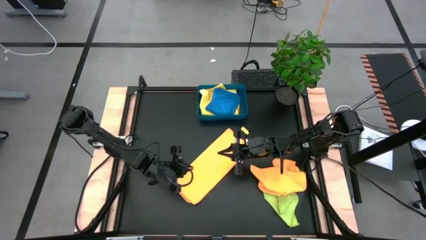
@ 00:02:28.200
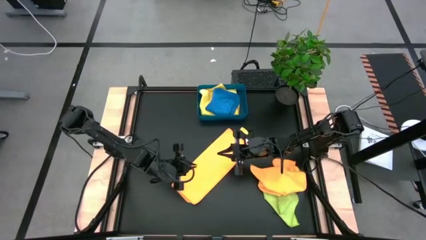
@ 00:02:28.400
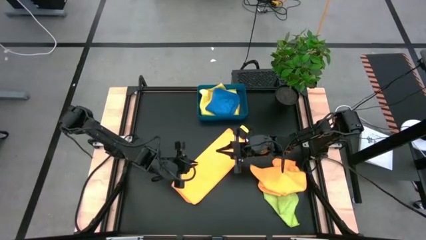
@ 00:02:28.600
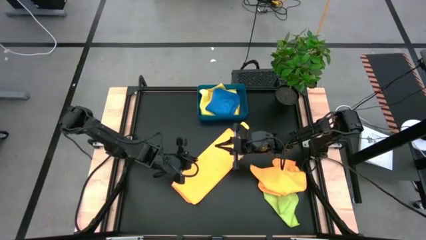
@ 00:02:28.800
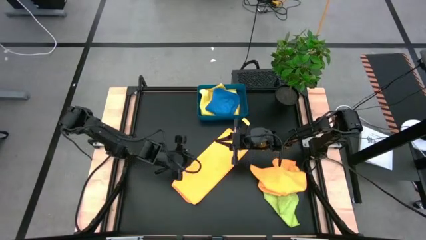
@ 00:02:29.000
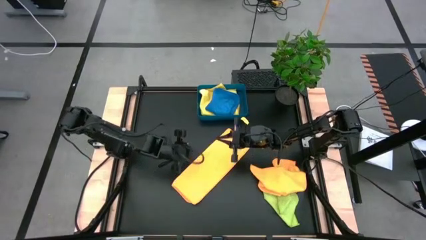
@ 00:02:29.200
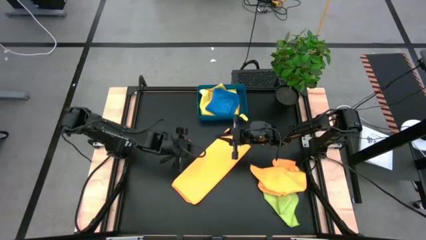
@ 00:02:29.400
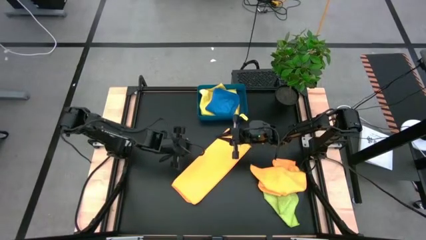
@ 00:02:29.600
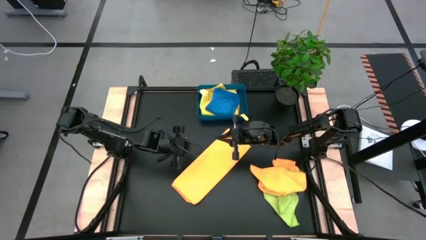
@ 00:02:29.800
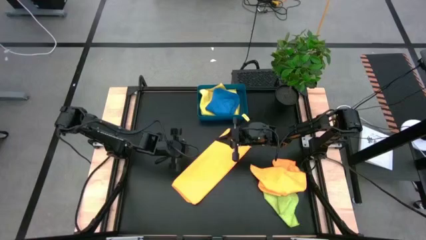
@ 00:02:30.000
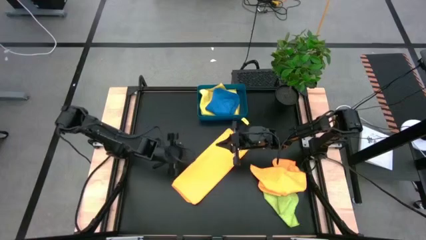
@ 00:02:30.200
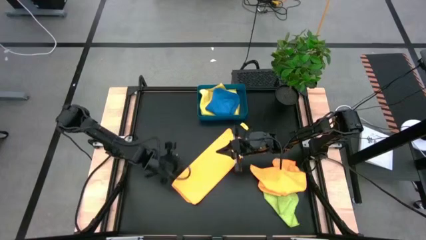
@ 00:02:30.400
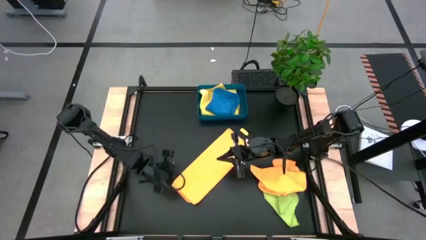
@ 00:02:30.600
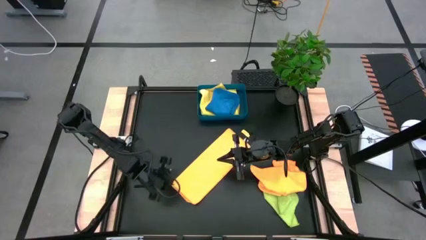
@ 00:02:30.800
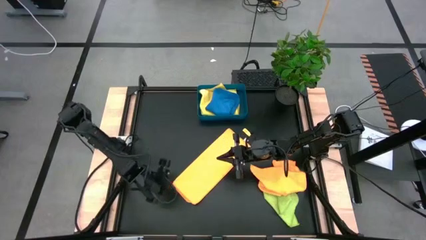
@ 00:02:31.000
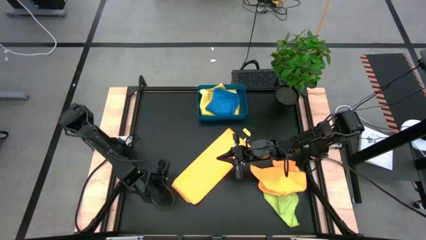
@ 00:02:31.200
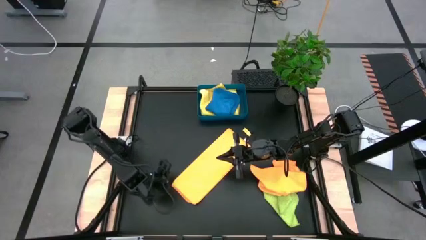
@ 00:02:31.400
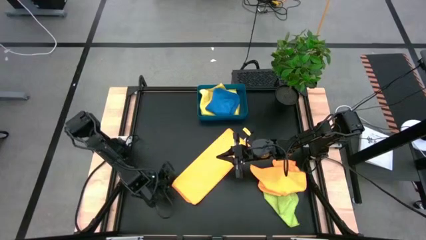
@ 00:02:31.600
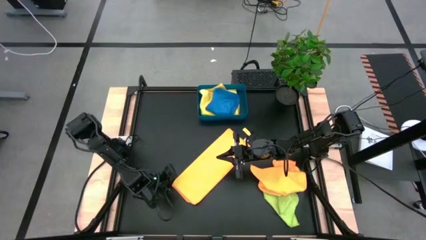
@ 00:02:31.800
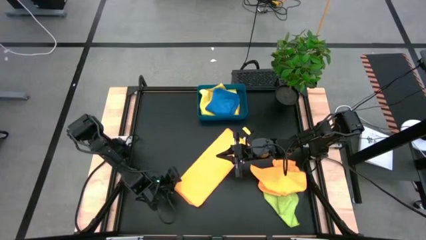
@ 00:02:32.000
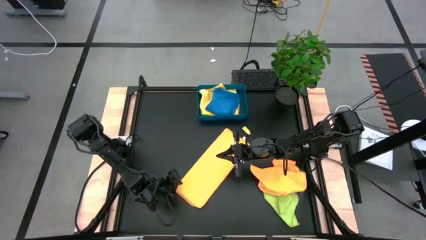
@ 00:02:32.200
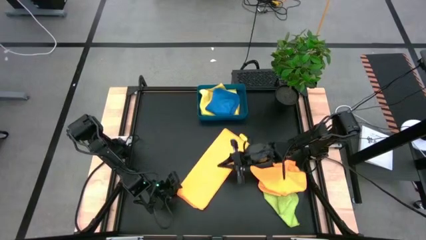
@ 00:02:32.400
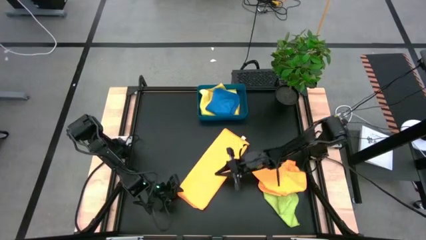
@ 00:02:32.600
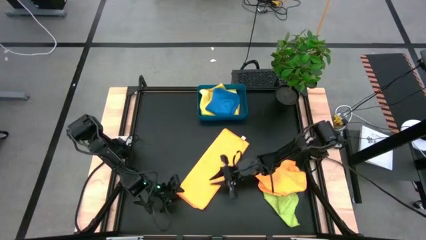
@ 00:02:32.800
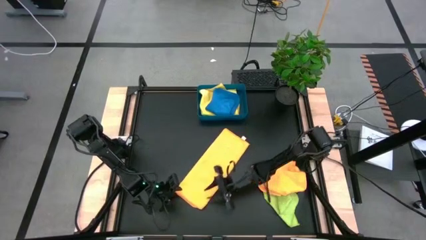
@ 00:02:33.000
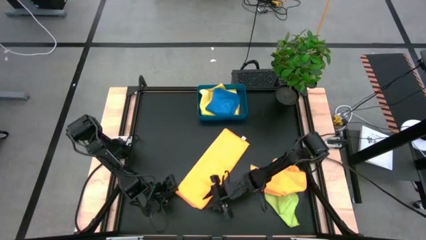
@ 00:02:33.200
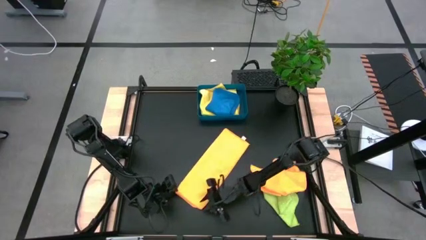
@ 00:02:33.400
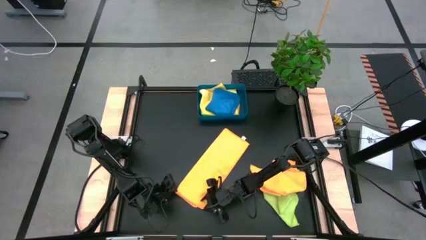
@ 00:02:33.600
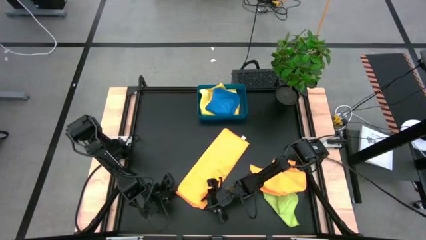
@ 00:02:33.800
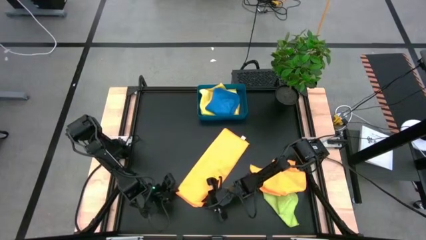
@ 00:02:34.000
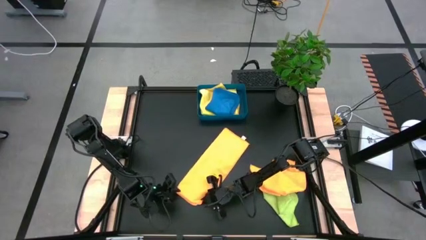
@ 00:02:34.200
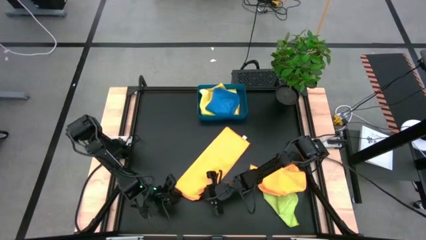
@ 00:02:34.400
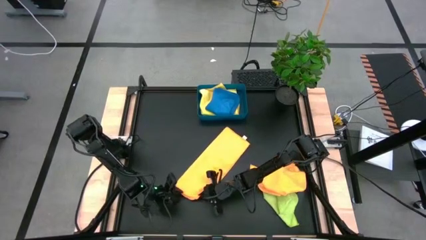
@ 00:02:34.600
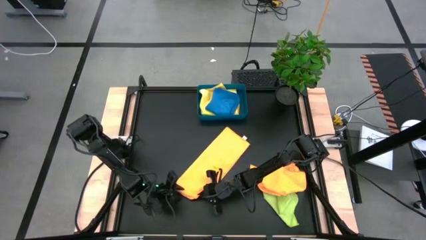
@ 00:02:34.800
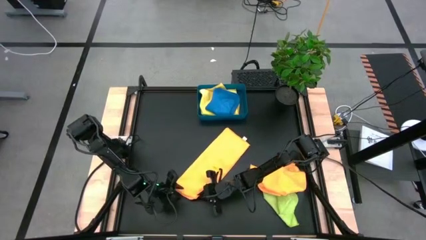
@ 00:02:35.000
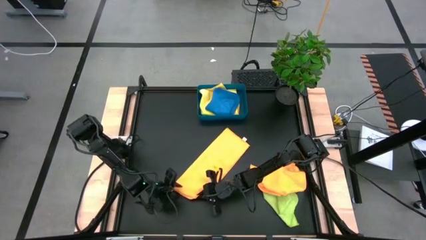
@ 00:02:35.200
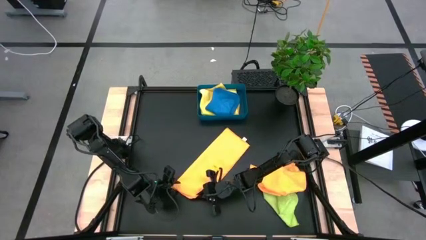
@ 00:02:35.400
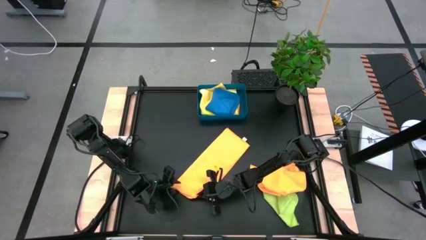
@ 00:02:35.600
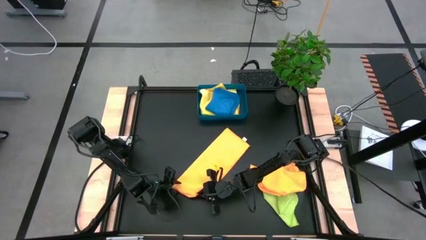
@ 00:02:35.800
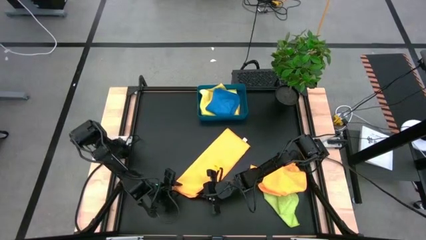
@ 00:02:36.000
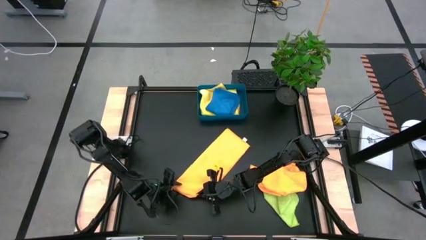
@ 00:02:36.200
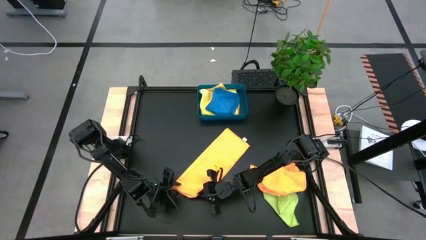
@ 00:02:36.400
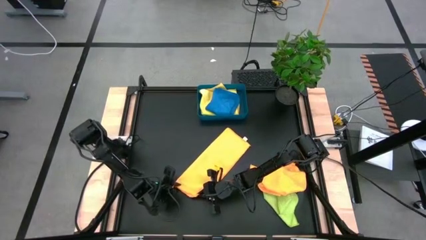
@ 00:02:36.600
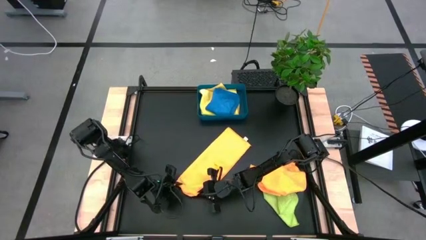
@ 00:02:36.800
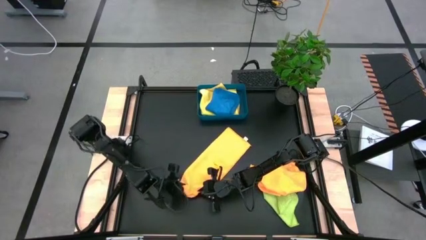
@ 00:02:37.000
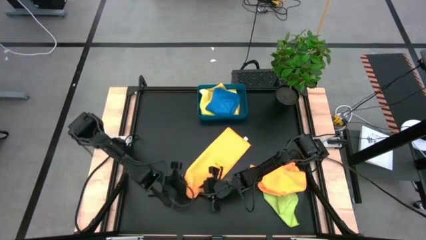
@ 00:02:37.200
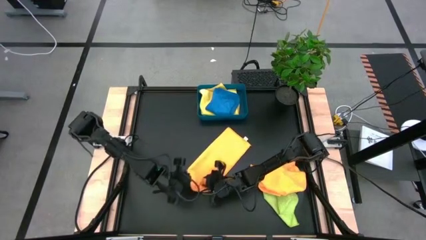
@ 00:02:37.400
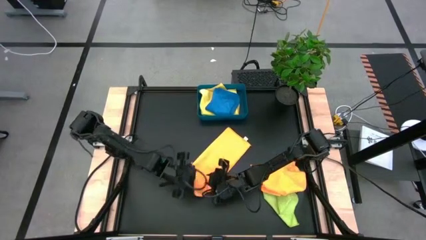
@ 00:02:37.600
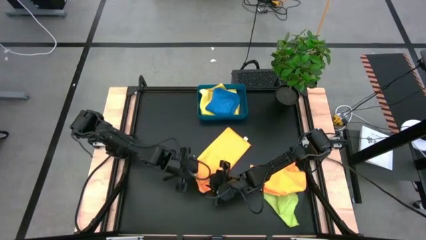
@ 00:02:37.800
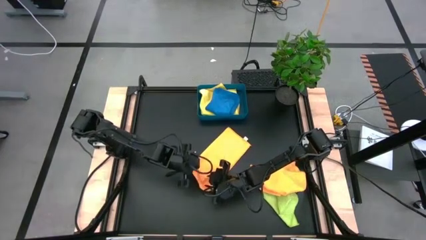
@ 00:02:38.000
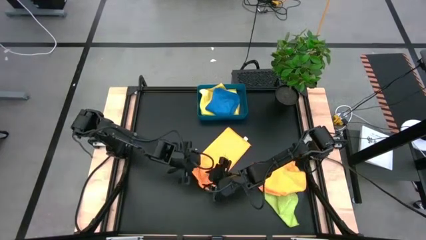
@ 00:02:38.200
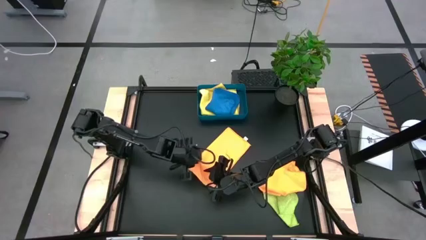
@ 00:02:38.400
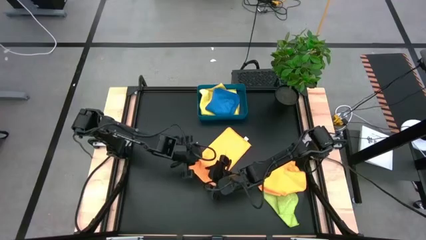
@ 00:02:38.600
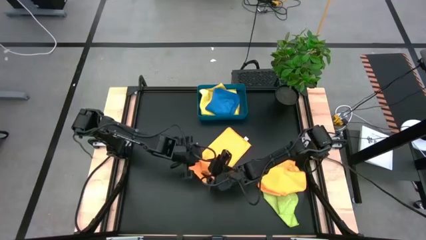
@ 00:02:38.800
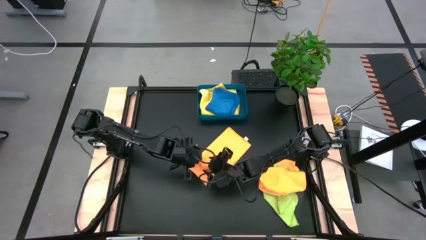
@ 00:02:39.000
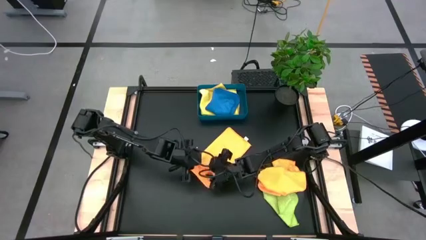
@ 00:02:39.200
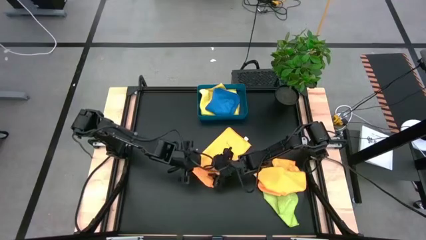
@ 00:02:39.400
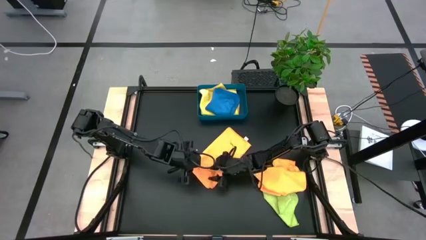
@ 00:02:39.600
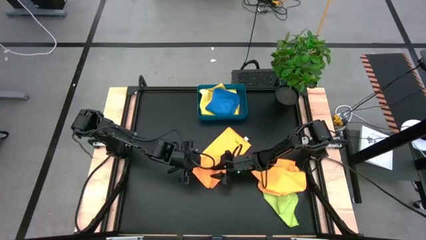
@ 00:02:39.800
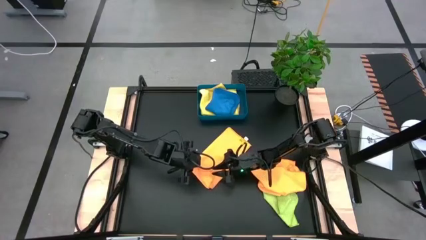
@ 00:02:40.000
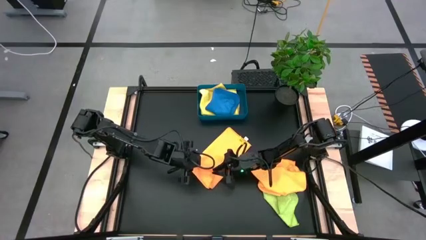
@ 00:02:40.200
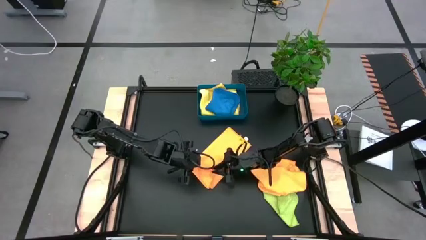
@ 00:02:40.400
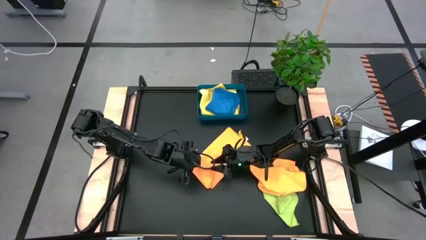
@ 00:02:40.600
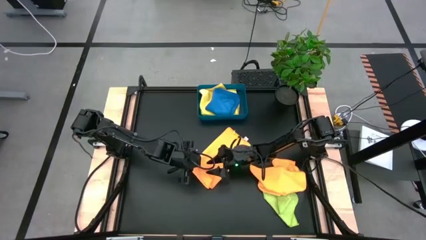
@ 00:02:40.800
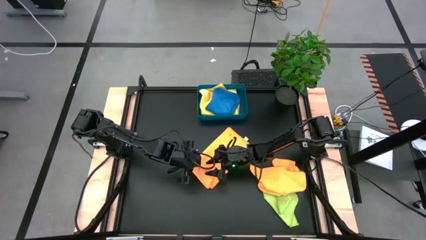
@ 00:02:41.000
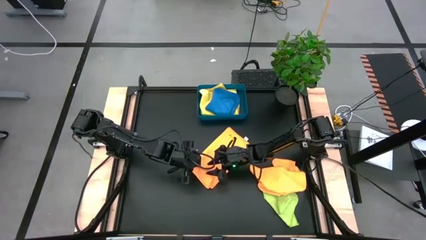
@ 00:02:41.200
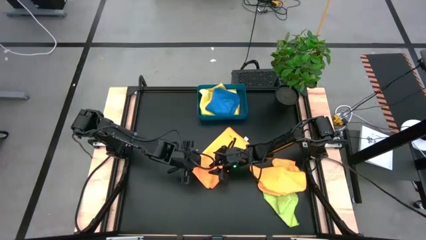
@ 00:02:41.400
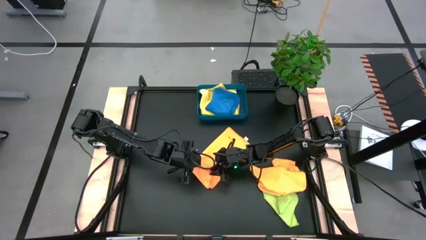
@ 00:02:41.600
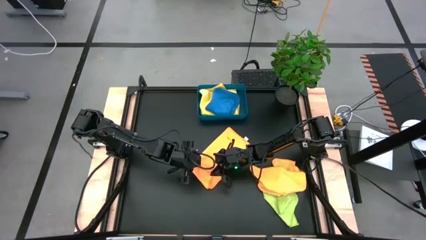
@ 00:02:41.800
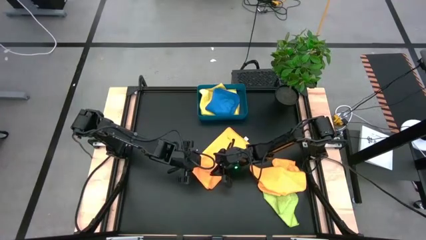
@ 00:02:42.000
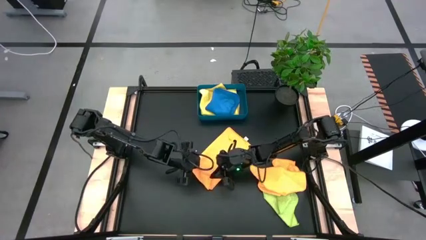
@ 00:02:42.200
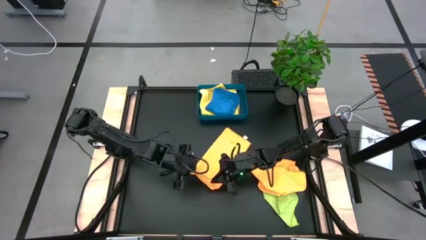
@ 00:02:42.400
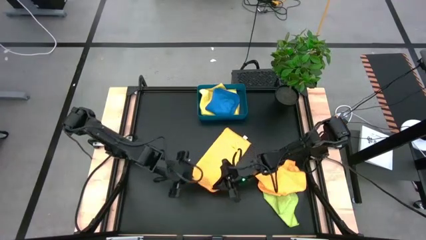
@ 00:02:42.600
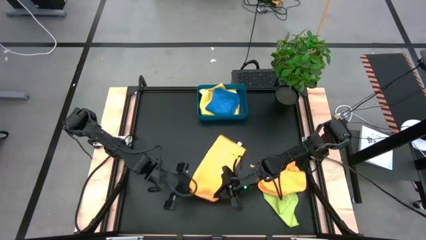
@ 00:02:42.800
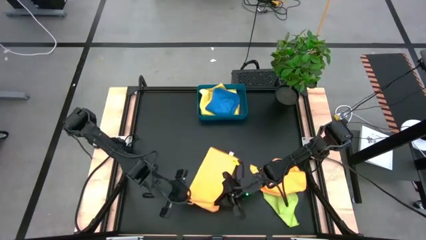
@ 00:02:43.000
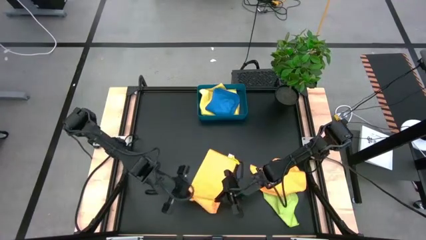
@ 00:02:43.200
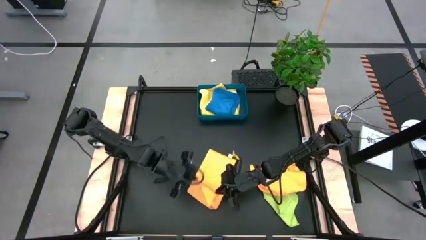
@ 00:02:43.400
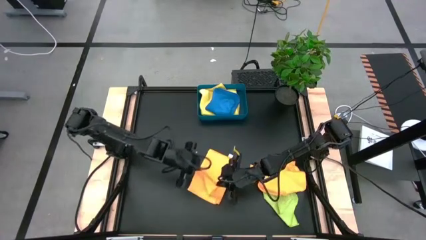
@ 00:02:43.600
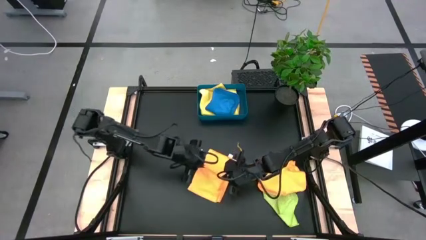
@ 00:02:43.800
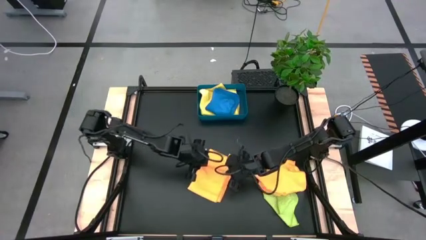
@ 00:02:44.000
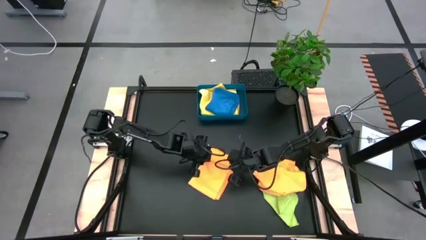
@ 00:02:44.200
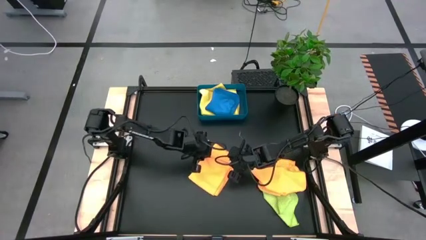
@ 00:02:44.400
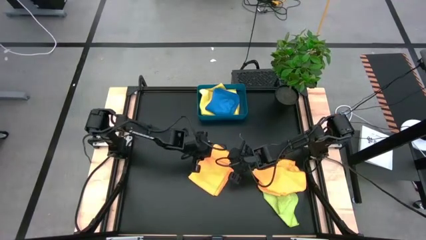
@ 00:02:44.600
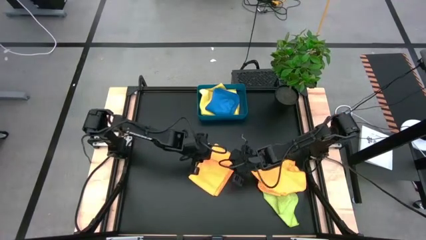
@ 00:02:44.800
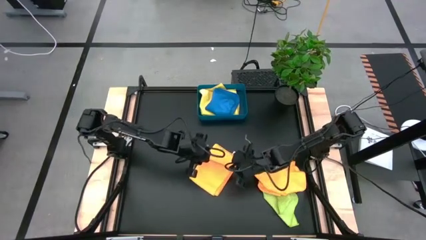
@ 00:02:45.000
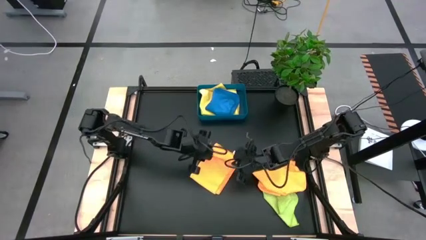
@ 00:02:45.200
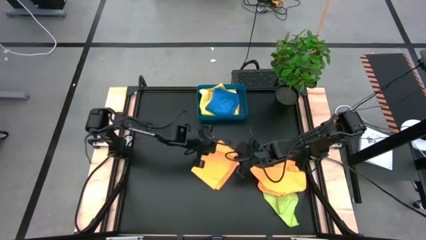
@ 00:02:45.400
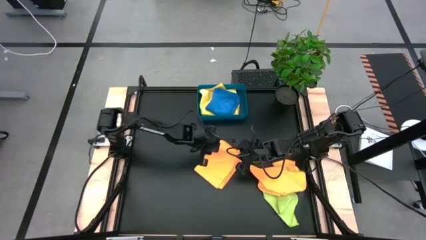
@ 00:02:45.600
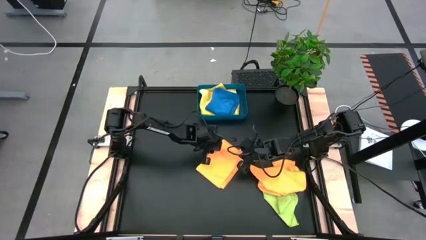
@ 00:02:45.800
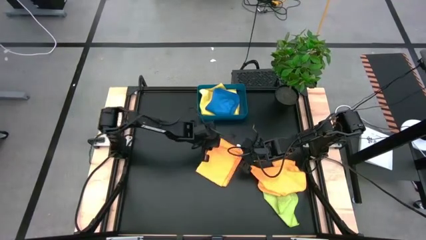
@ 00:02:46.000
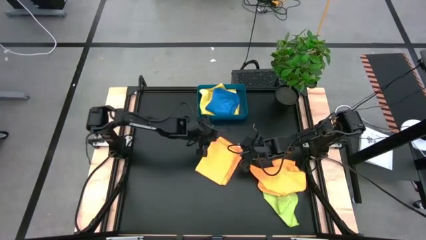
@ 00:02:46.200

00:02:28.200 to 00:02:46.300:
Task: Fold microfiber towels
Fold the left orange microfiber towel
